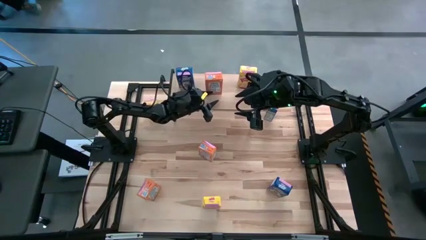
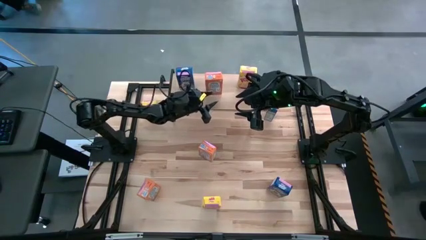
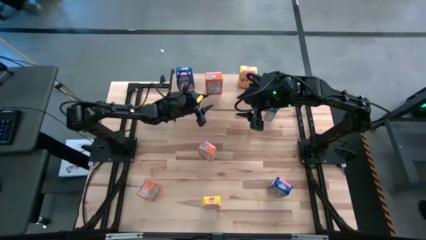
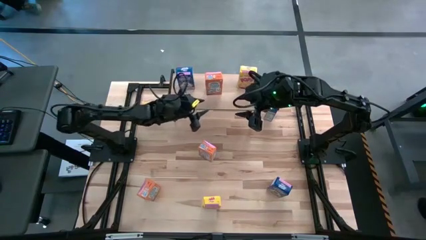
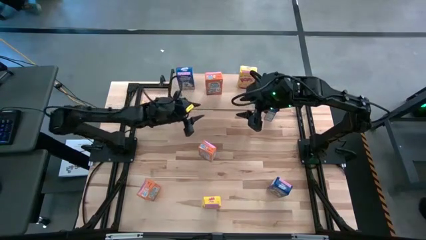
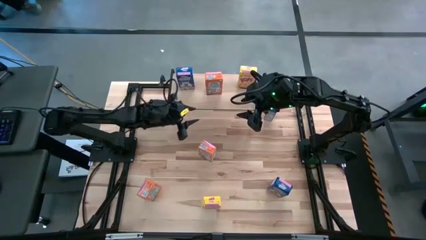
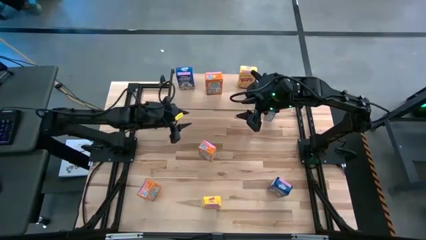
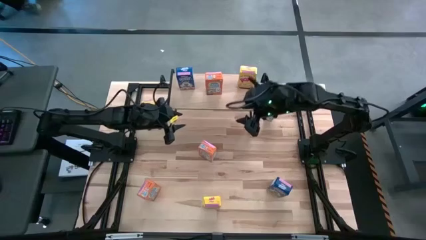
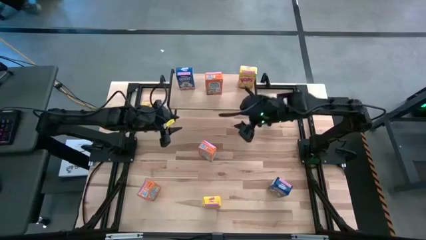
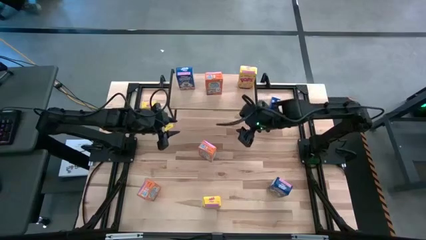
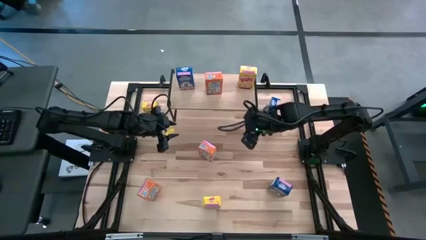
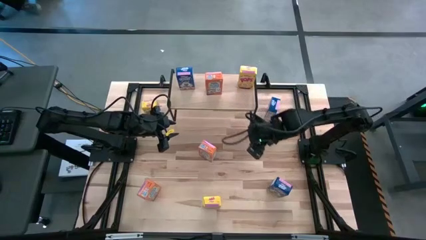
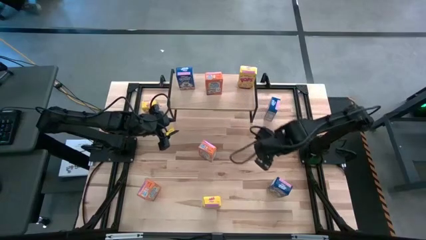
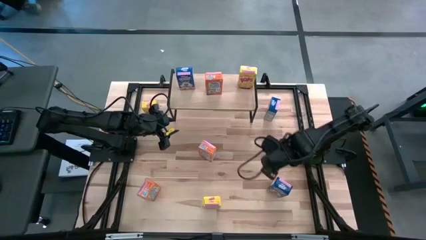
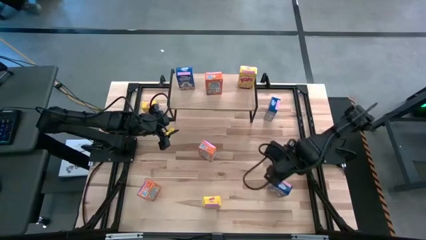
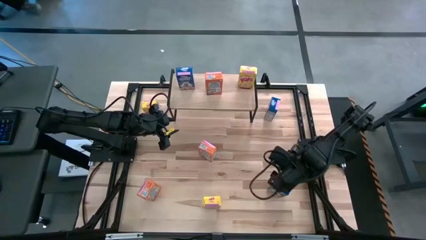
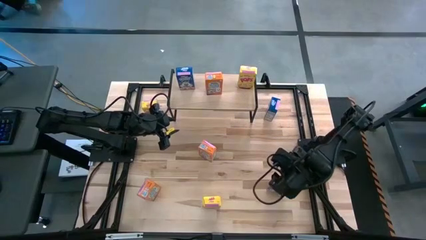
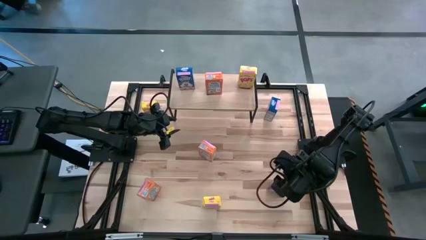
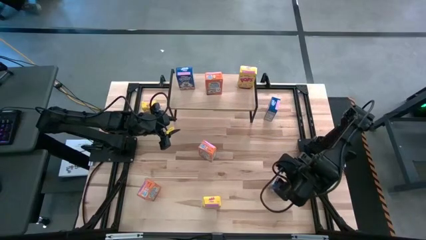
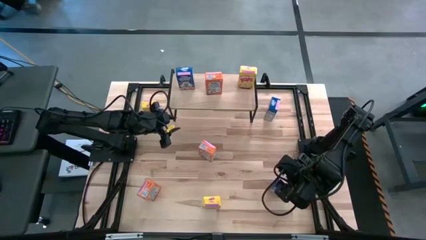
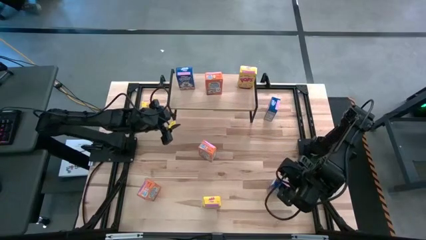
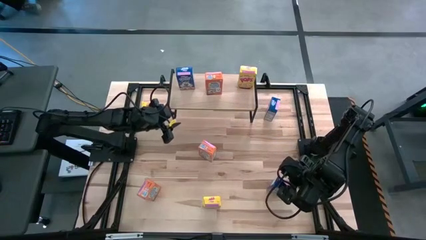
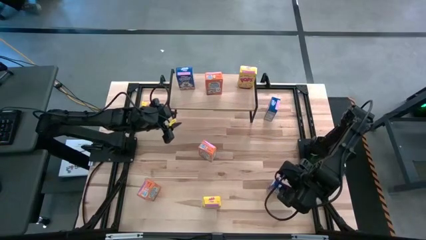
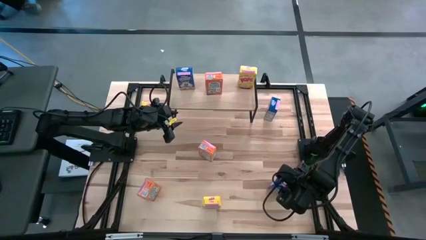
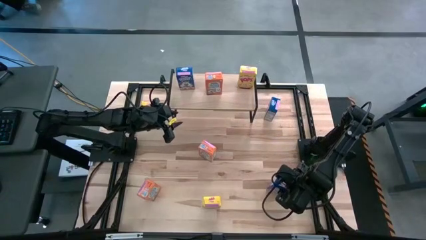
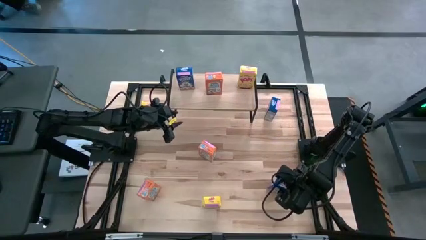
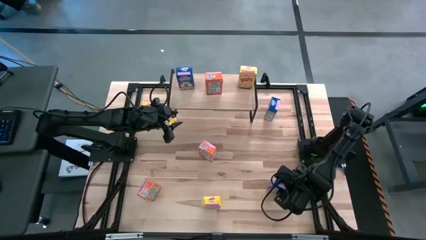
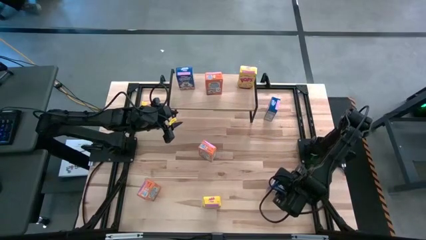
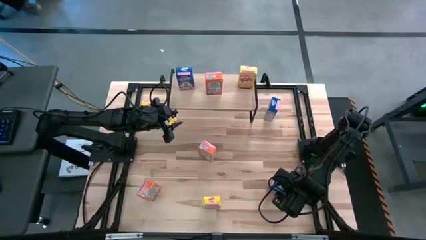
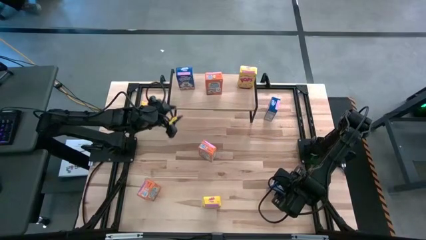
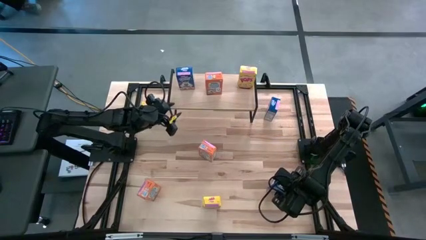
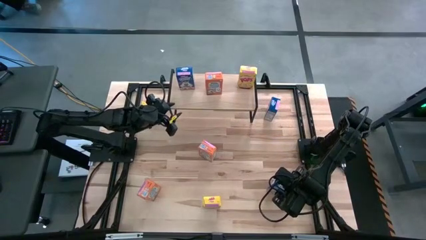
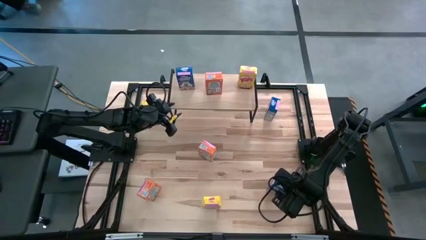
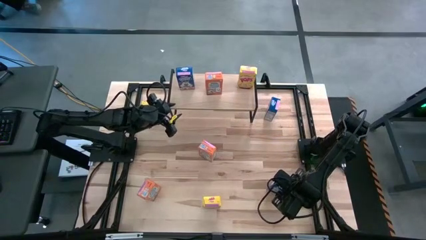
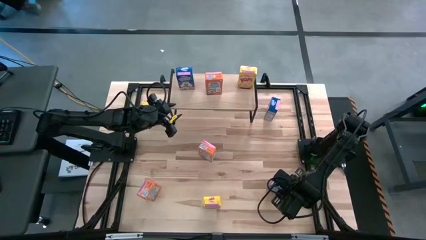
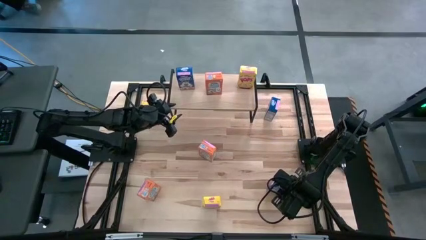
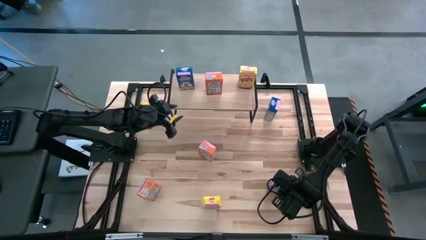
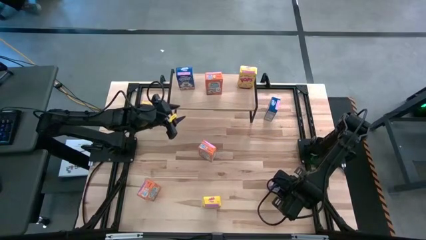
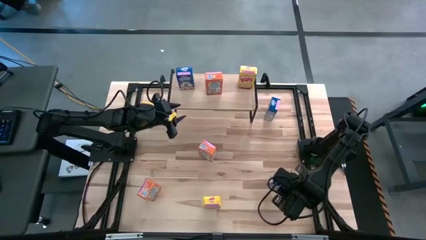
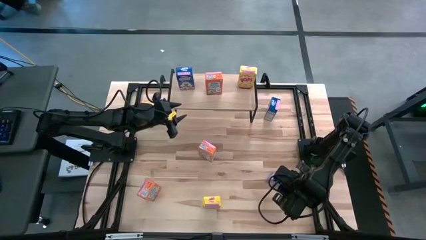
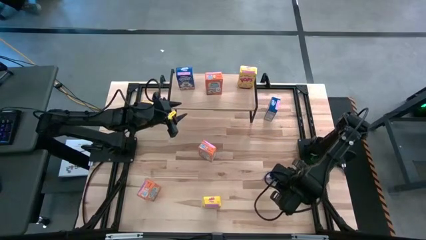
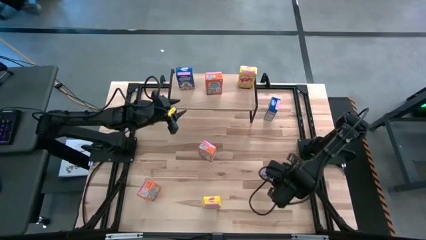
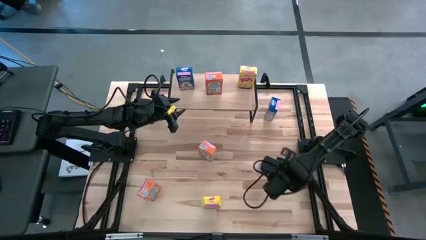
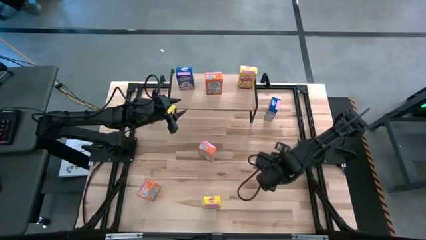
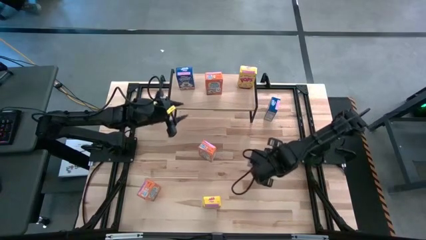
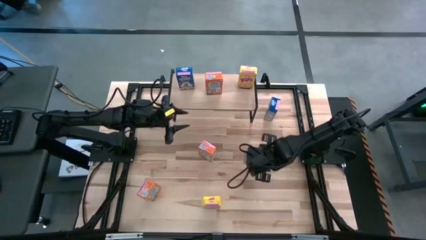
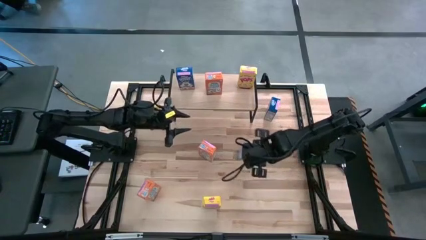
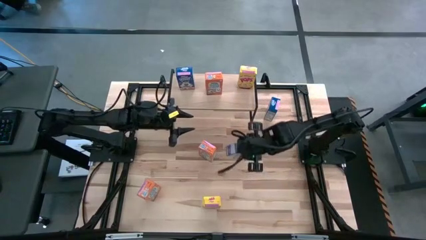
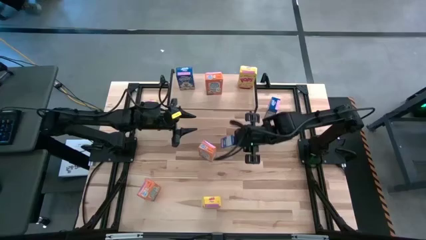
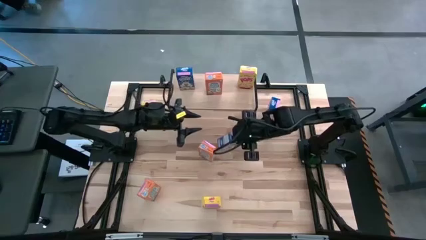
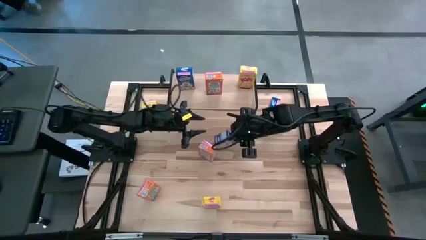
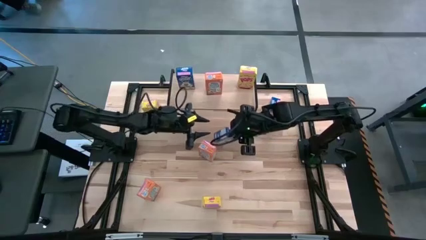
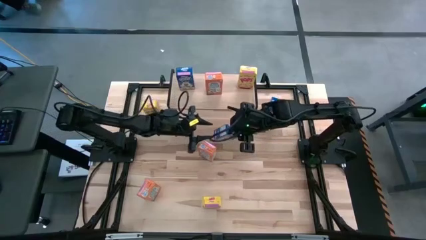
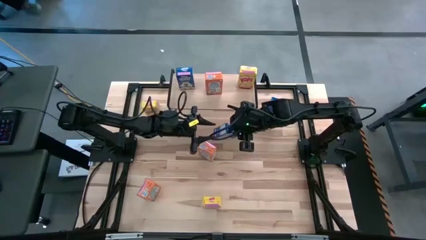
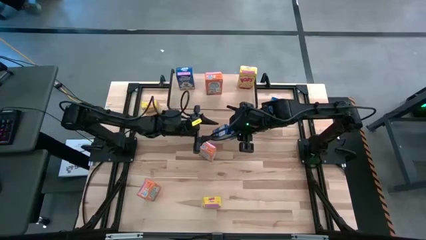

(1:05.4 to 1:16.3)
Task: Stack cereal on shelf
Put the bottom blue cereal box aligned with the other blue cereal box on the shelf

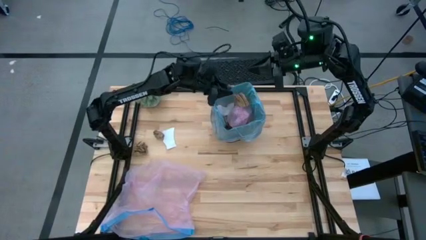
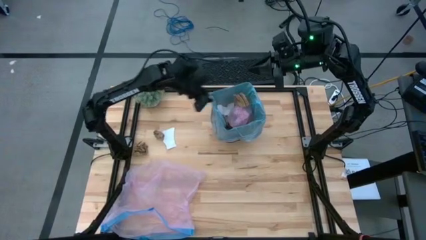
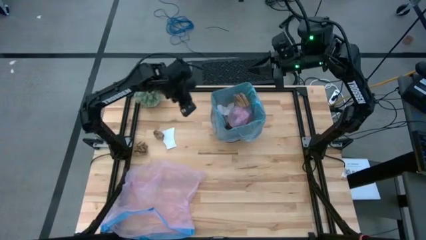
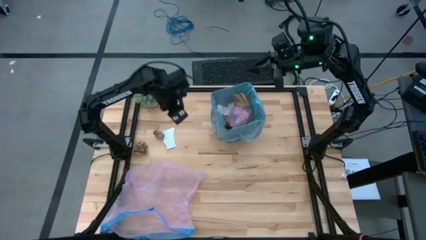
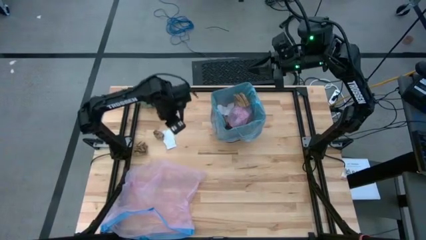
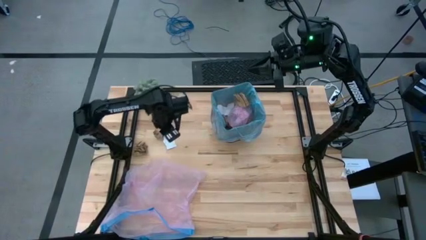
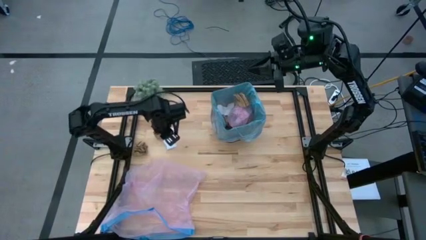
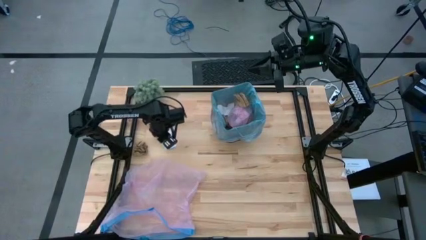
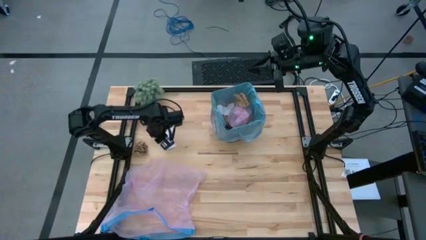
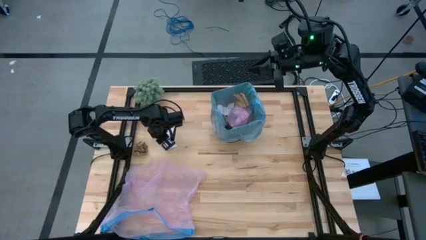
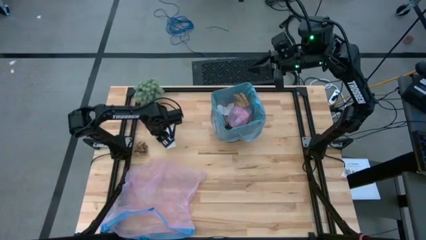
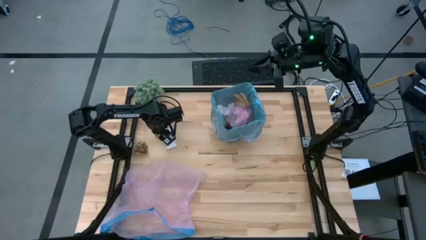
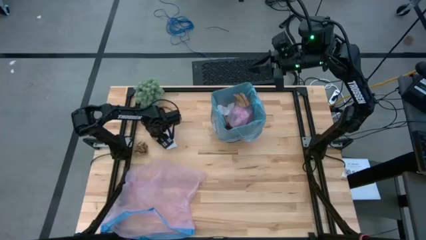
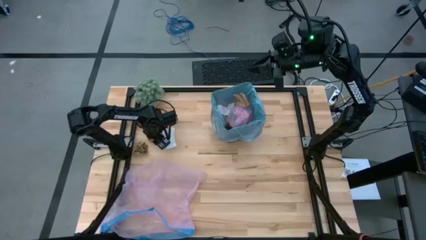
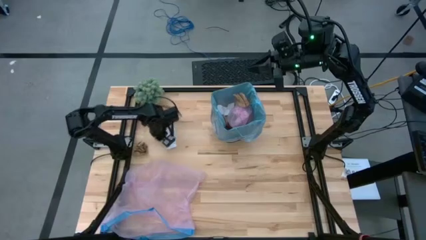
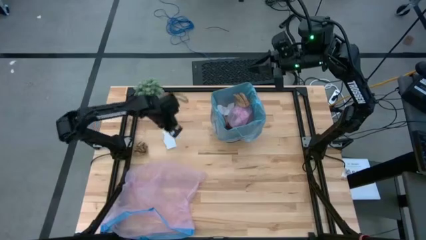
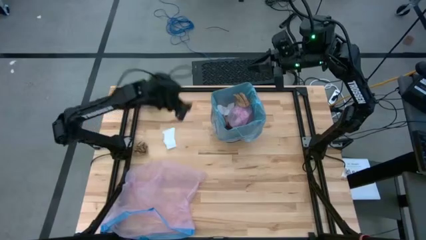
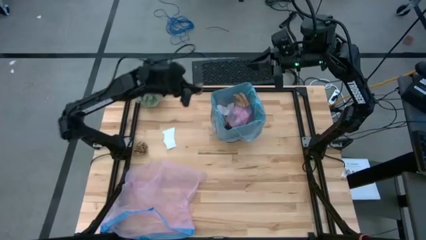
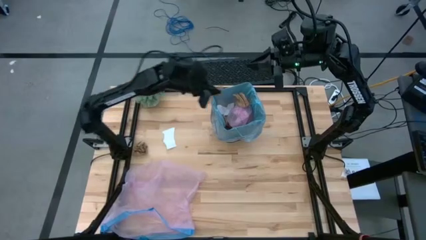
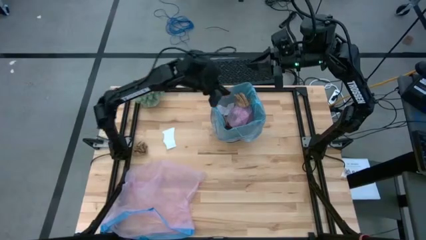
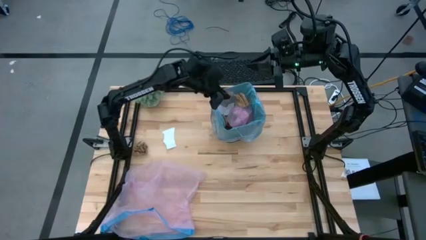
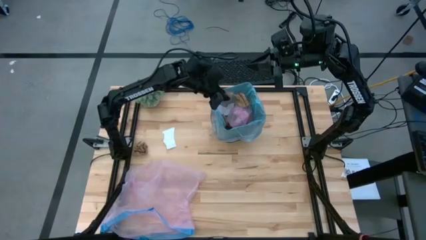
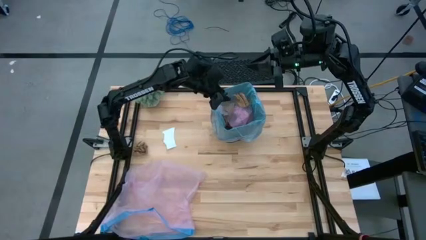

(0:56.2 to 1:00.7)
Task: place trash/remove bag and relplace
Put the brown napkin into the trash bin
